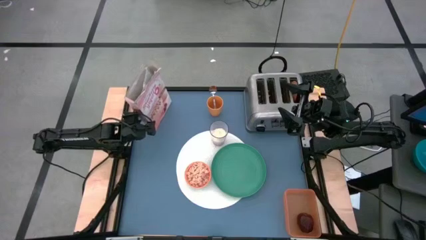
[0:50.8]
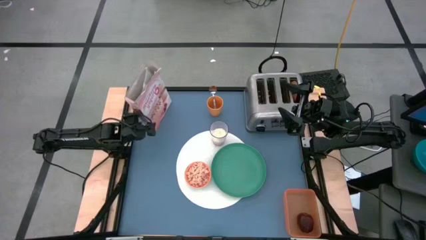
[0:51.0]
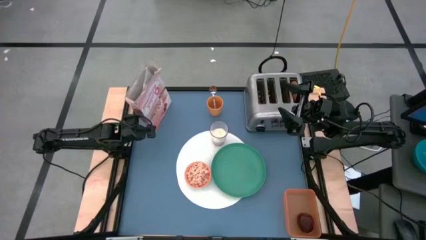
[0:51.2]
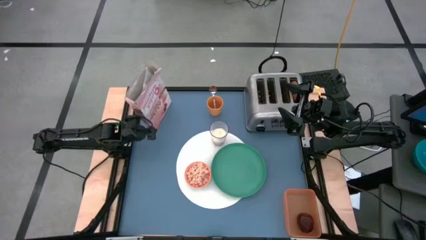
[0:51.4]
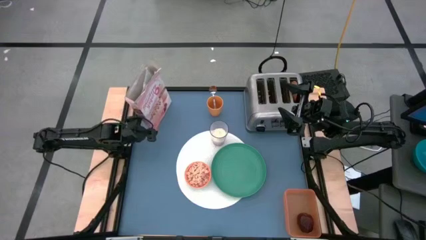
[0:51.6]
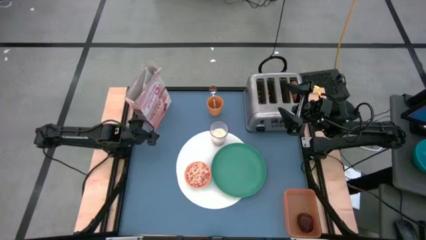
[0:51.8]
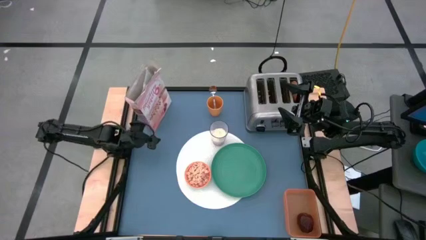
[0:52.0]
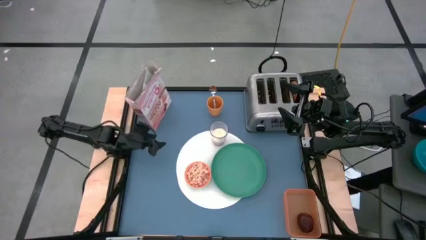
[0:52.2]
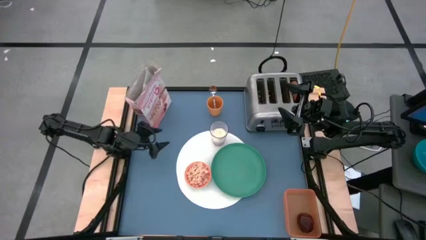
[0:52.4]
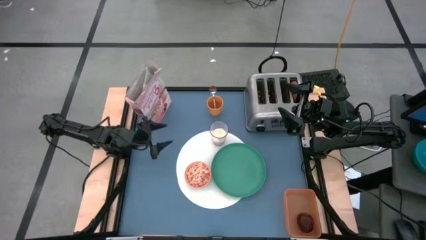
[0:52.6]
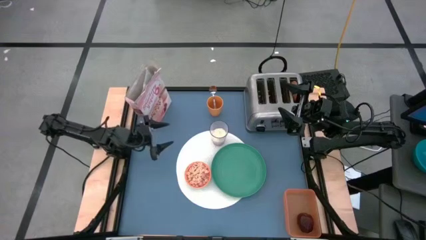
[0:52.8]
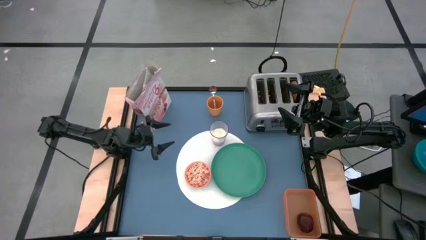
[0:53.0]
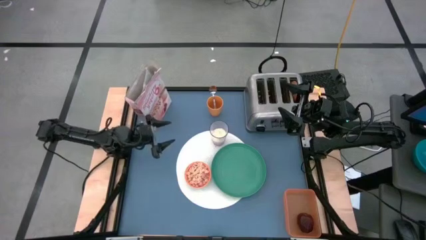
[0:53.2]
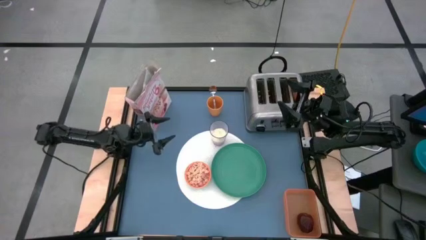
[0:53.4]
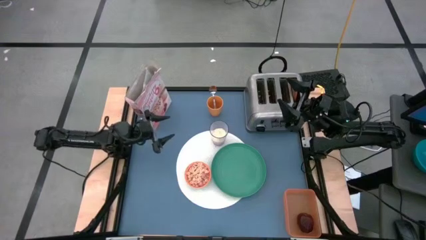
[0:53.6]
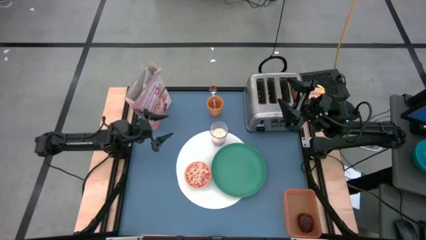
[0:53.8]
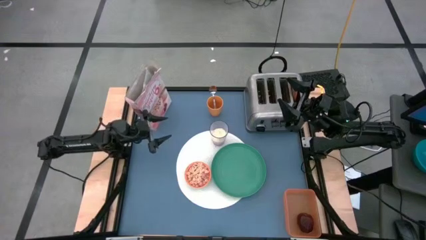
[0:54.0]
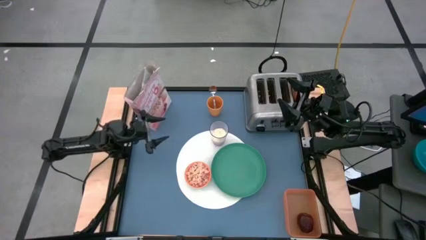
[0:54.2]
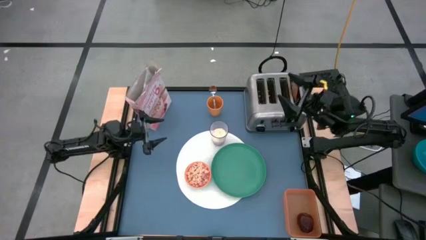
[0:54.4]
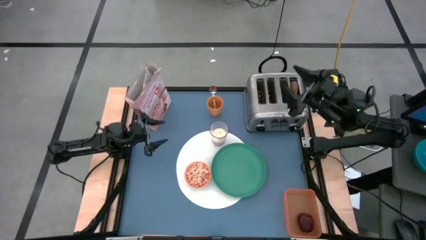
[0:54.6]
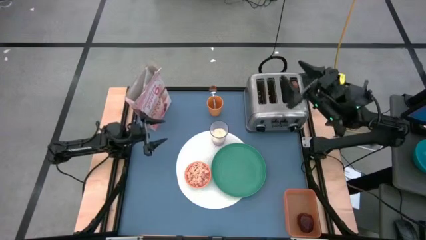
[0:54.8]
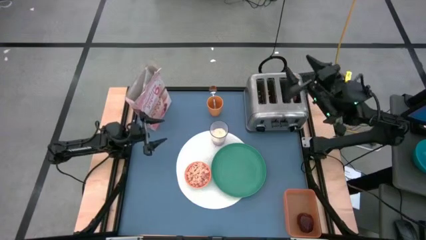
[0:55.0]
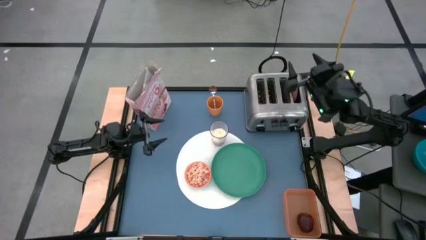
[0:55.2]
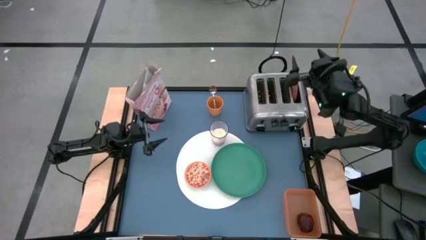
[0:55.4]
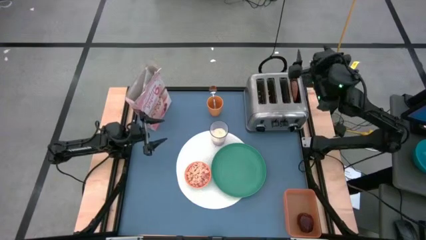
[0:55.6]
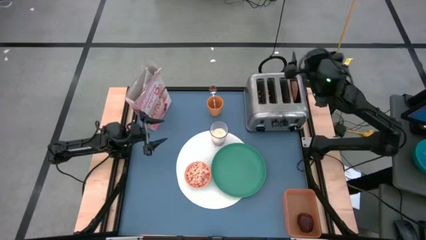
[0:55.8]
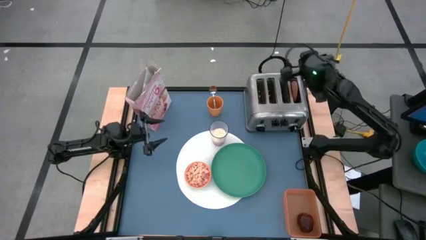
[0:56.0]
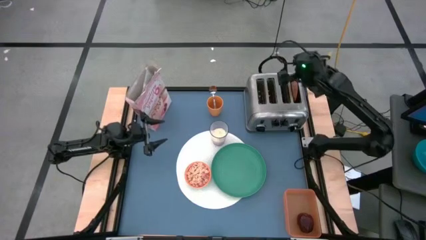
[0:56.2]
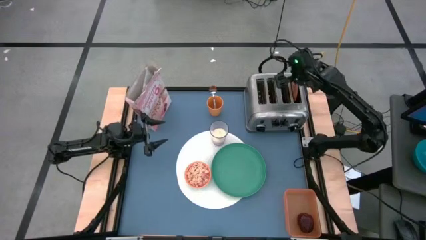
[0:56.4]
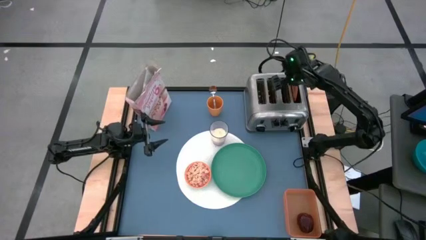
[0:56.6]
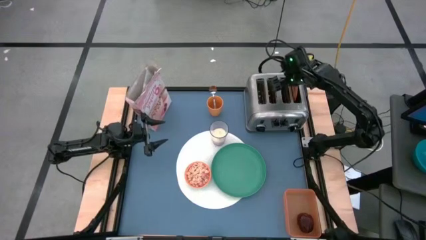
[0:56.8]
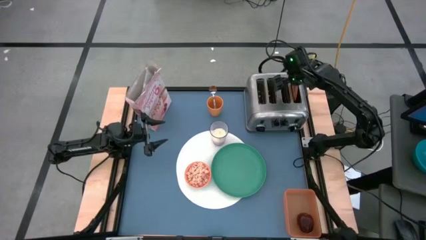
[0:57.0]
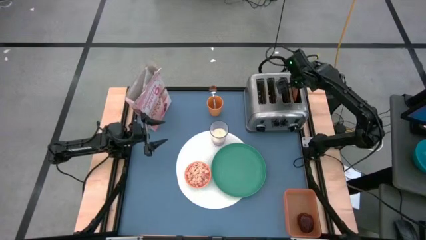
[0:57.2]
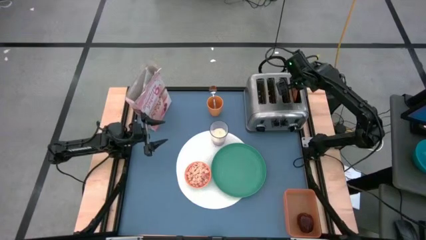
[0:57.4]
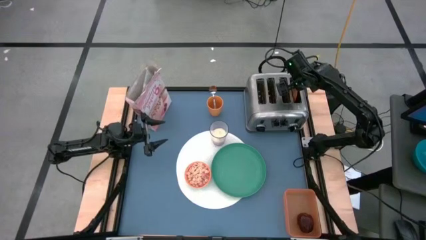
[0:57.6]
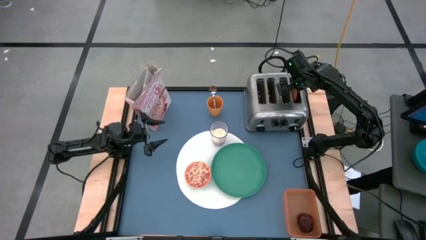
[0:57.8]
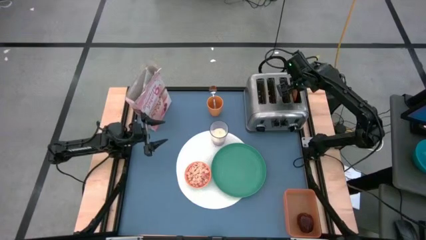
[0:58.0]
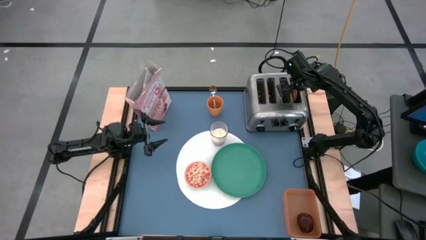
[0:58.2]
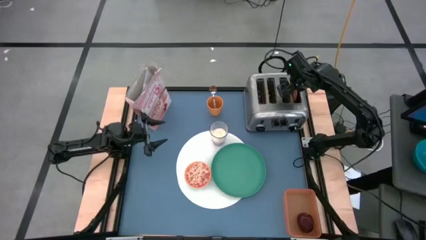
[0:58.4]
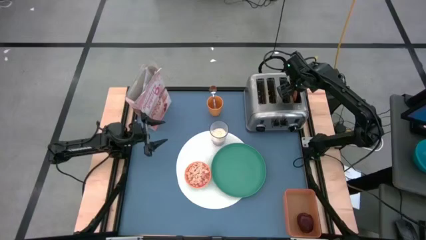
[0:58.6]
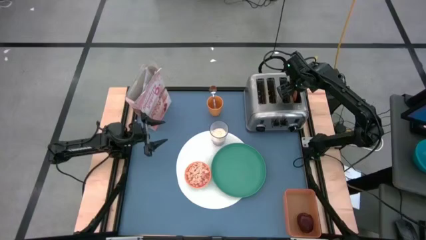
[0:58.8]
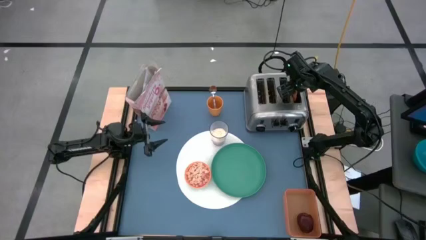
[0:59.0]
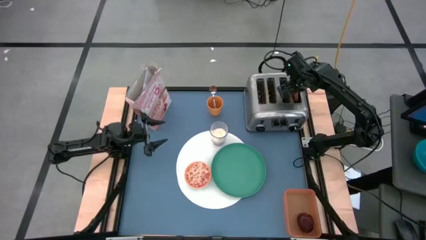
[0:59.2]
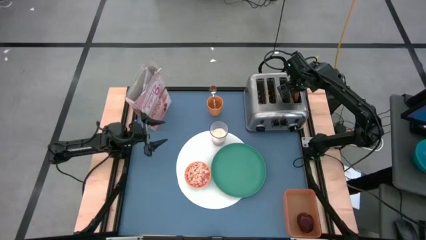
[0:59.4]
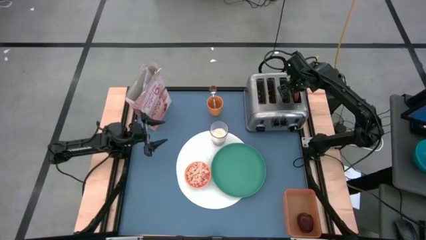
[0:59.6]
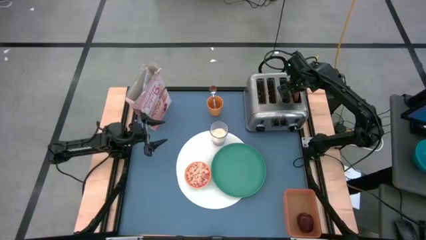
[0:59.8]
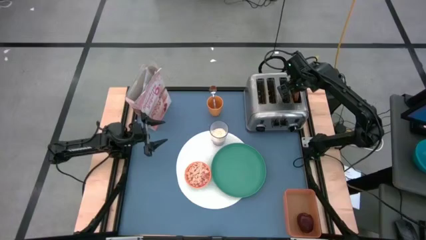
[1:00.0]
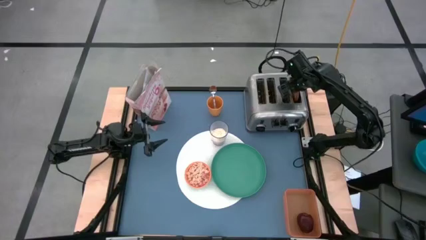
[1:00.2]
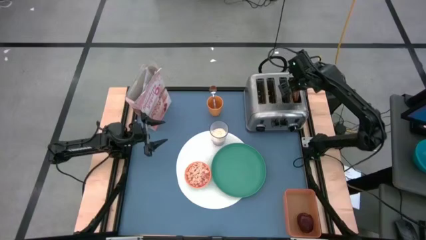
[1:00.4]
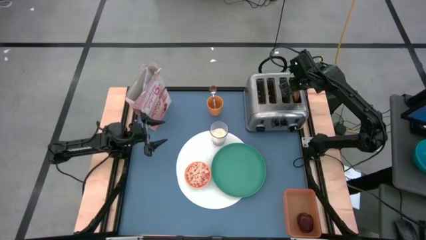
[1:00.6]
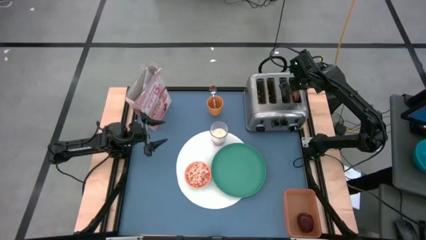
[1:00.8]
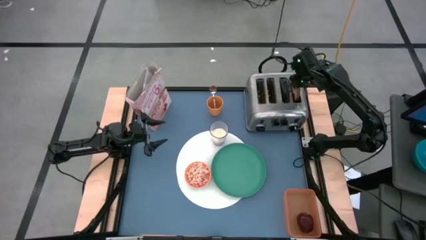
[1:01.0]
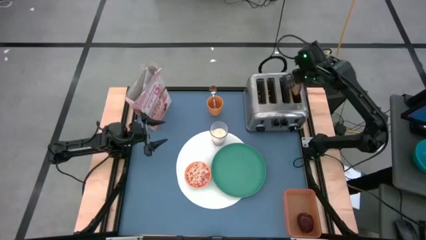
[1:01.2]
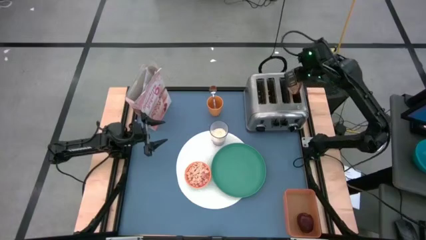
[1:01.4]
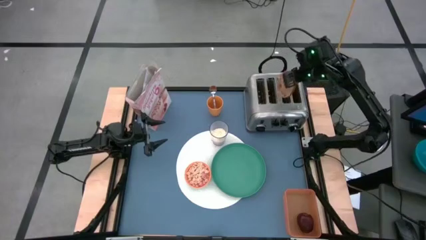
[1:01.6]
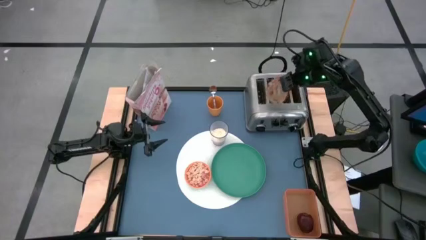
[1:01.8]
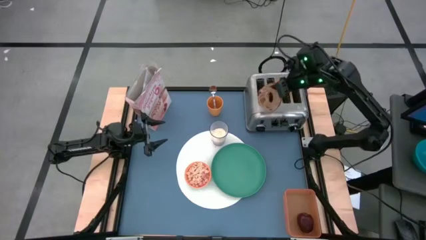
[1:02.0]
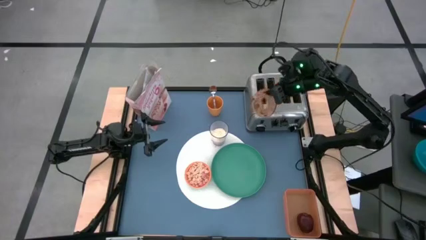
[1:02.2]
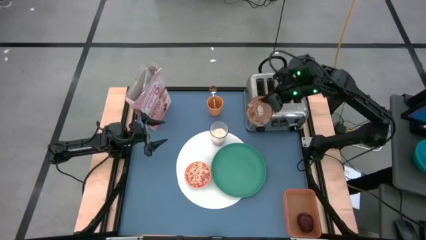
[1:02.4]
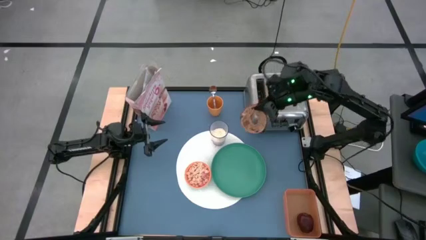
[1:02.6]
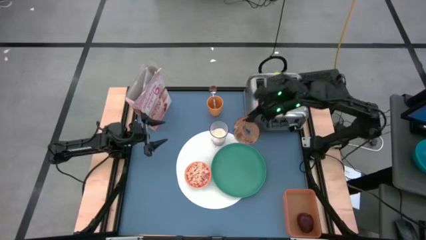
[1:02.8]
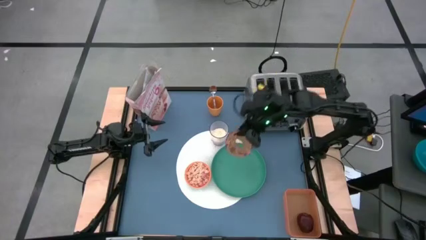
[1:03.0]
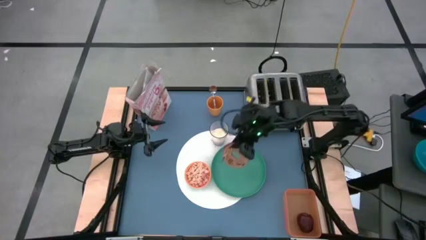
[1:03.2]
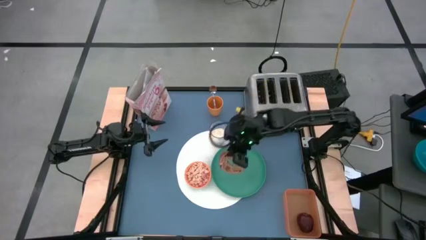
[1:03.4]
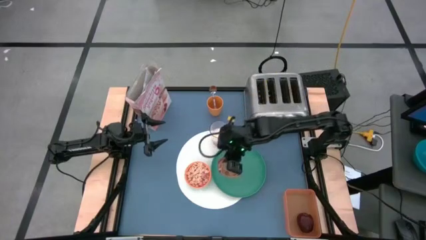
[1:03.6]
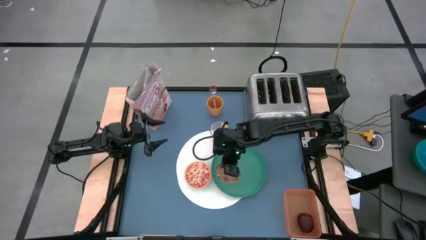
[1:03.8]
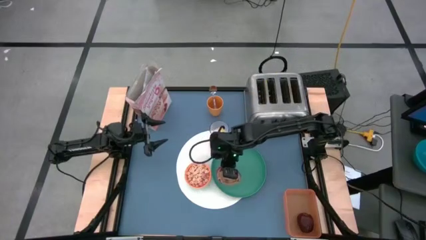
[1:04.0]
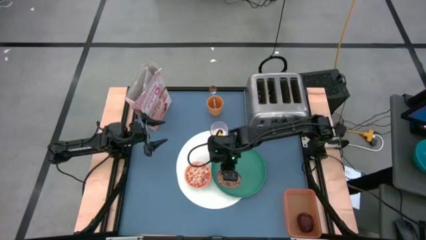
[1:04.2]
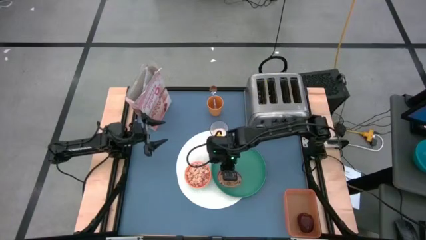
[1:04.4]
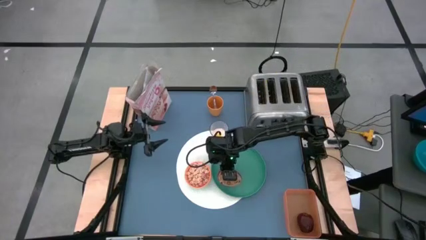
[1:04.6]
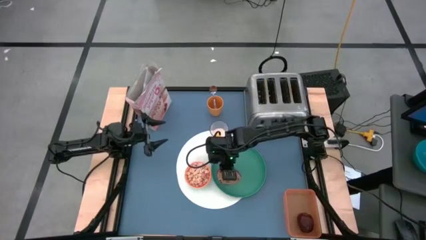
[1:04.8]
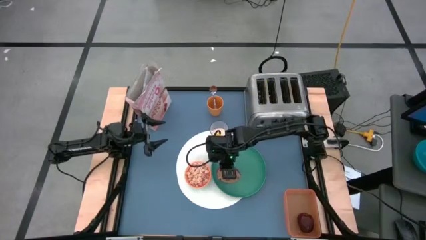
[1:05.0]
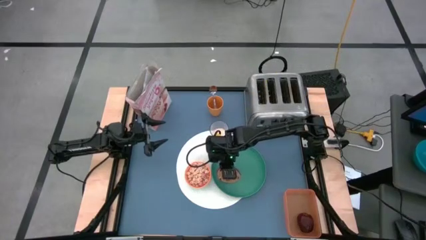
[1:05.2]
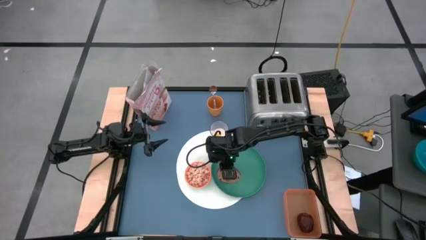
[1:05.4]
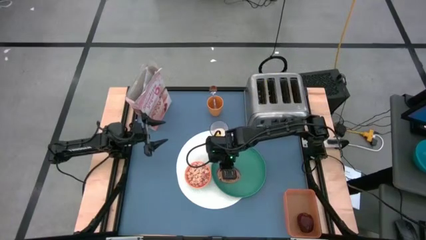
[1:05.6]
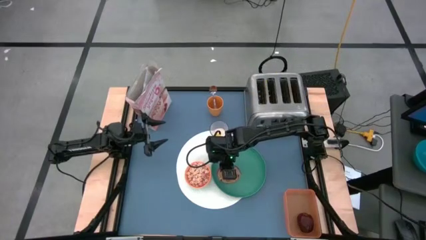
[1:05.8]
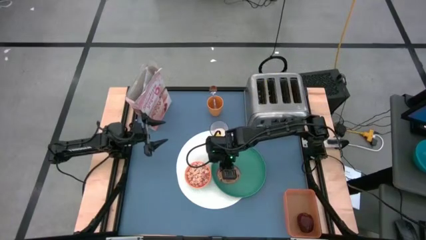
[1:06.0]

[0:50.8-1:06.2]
Task: Arrange a breakfast setting
Put the brown toasted bagel on the green plate
